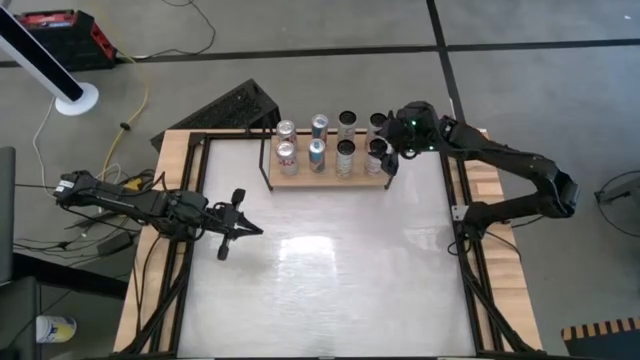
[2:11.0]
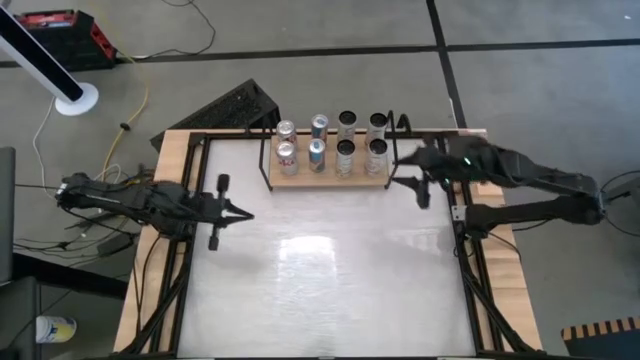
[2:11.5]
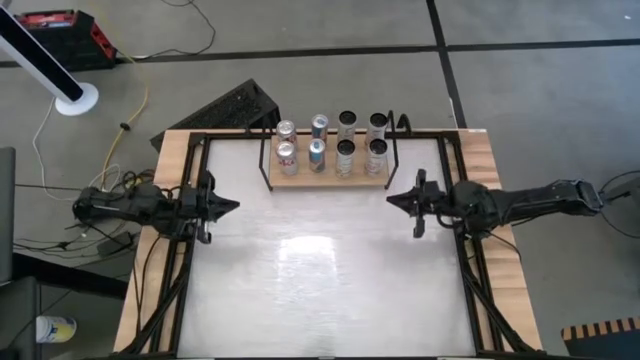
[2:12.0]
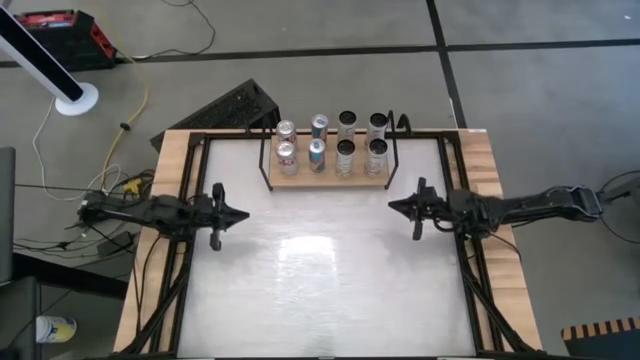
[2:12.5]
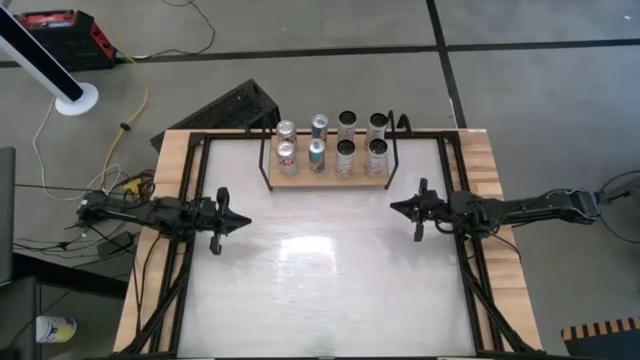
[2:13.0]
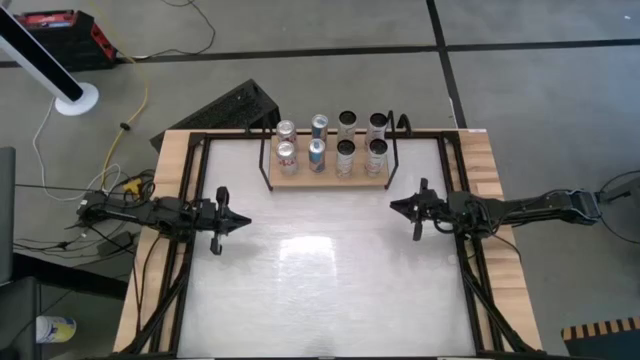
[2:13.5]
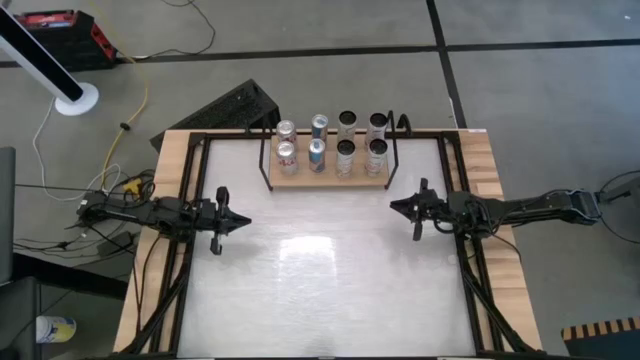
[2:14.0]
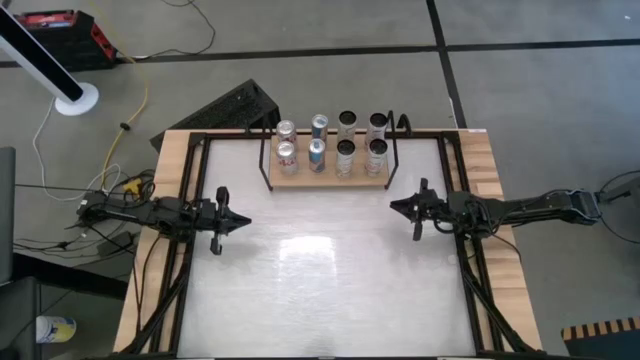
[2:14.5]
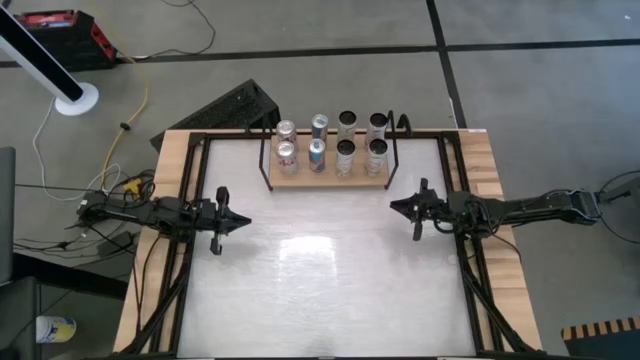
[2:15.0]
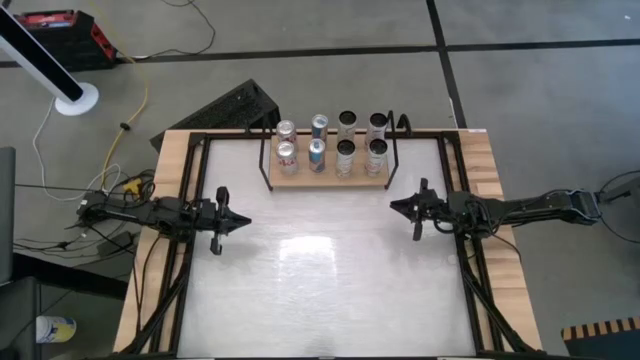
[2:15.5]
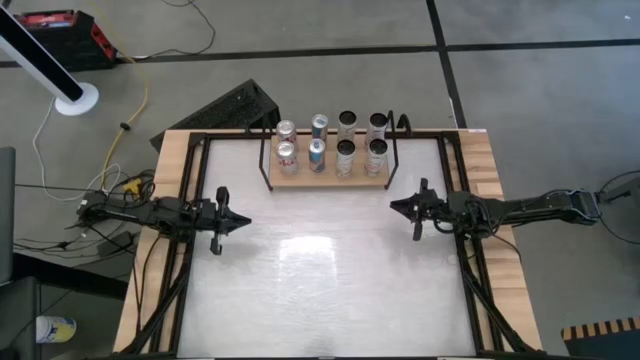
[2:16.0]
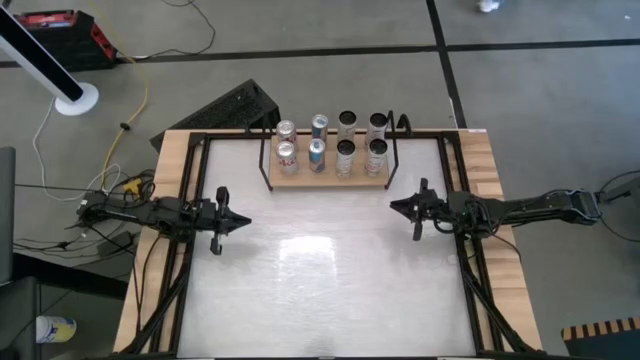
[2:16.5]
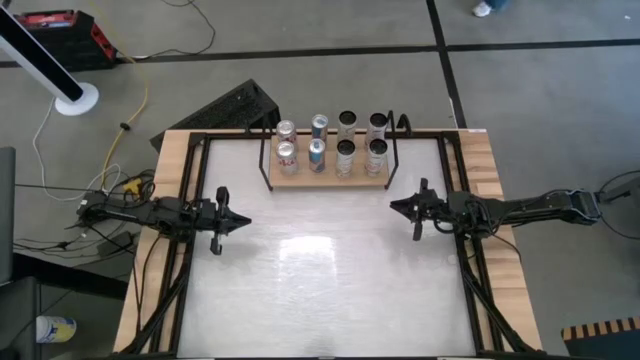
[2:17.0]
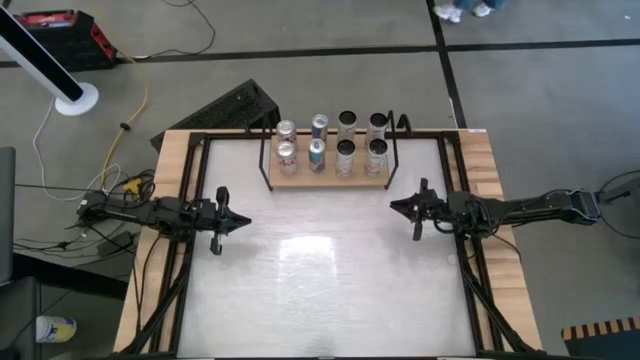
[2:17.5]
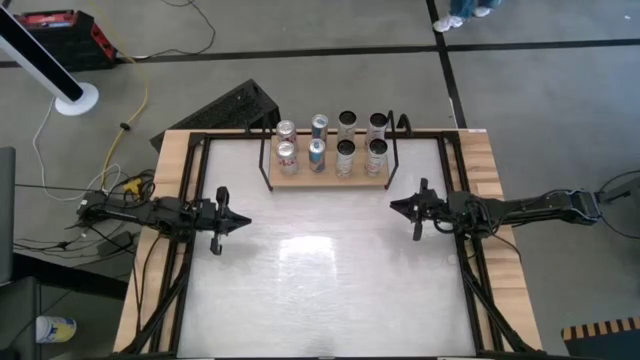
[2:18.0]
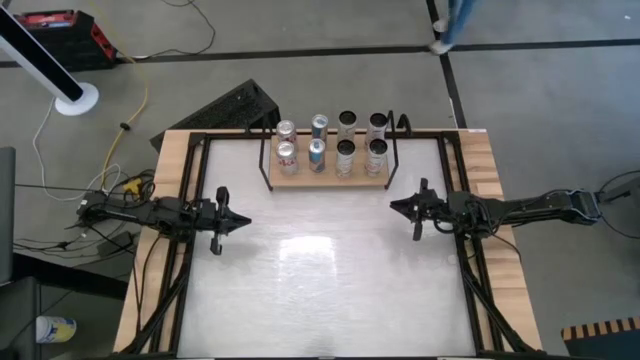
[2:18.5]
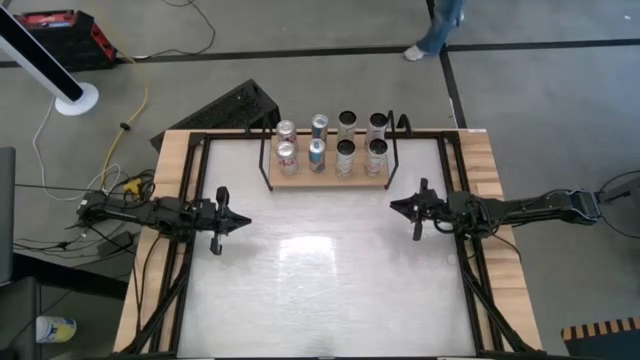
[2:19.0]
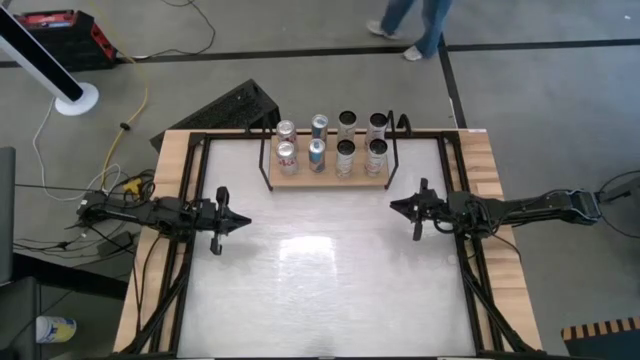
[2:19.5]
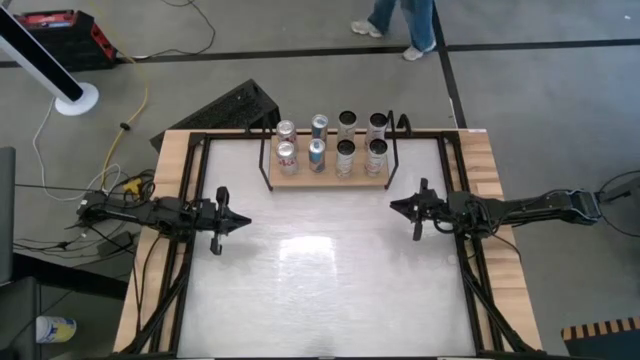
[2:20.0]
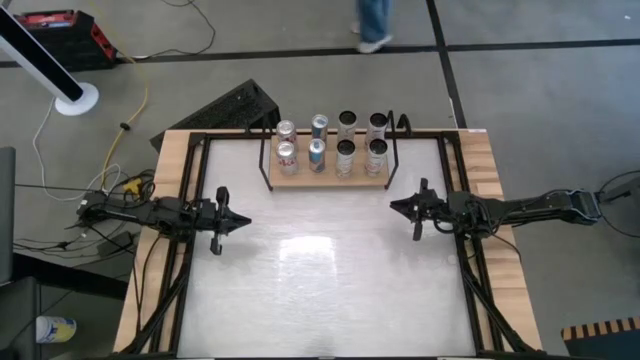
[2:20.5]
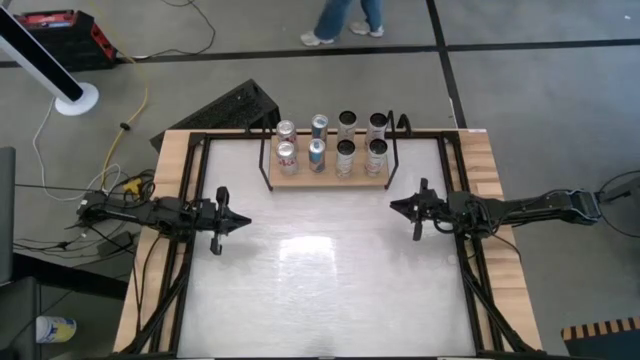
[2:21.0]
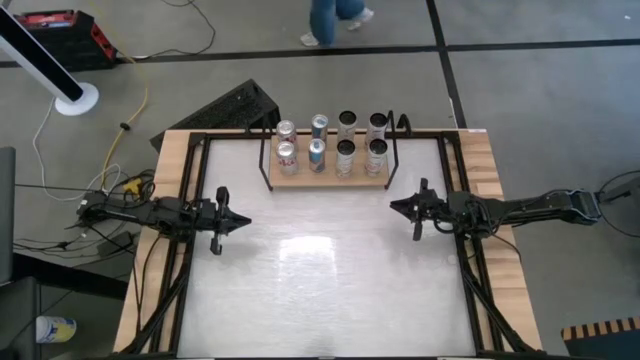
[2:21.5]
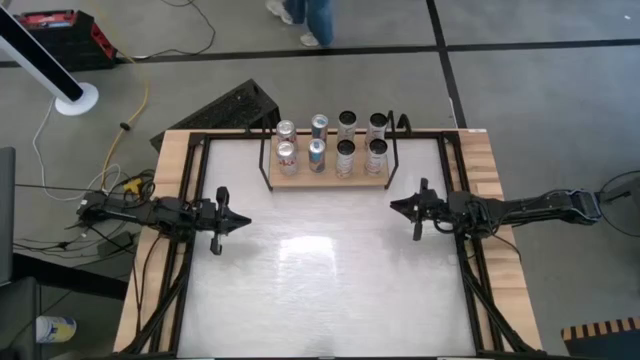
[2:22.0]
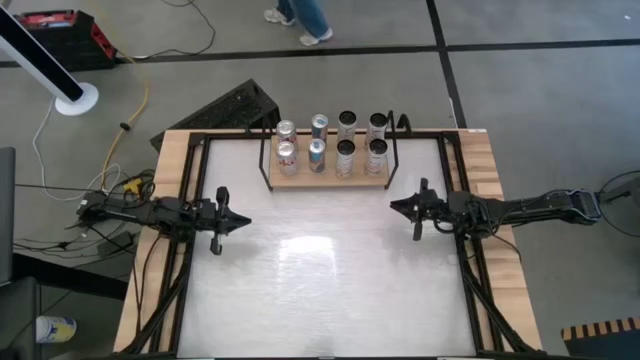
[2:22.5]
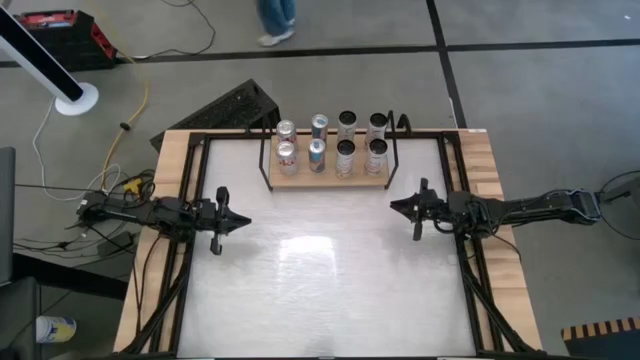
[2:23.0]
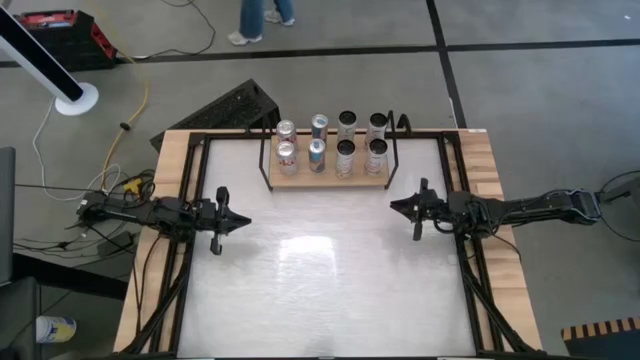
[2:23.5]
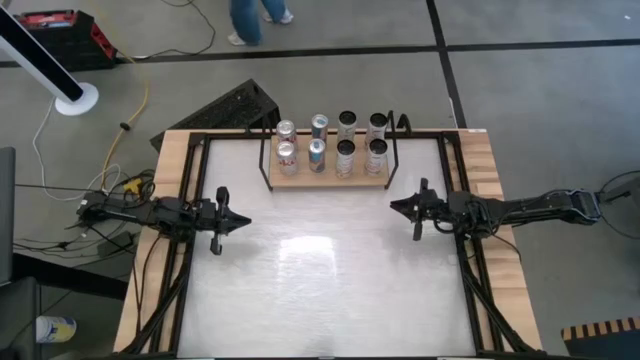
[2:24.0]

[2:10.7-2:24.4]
Task: Place canned beverage on shelf
Return to Home Position

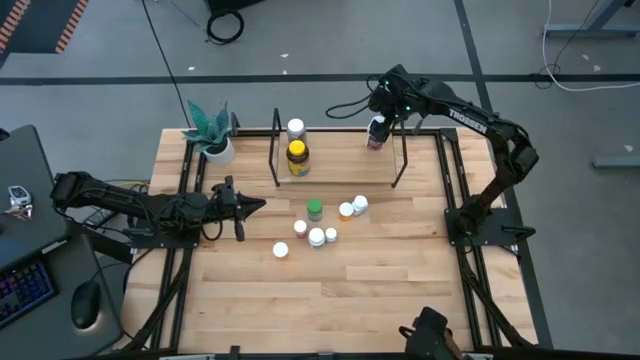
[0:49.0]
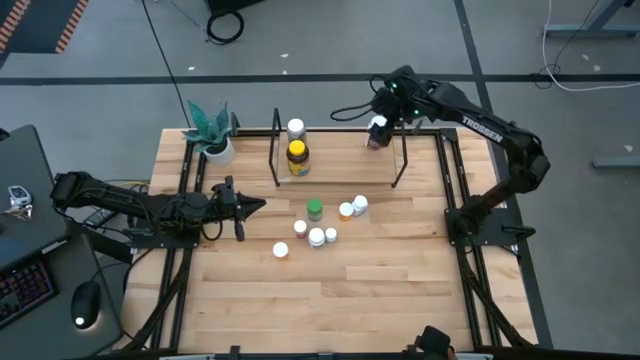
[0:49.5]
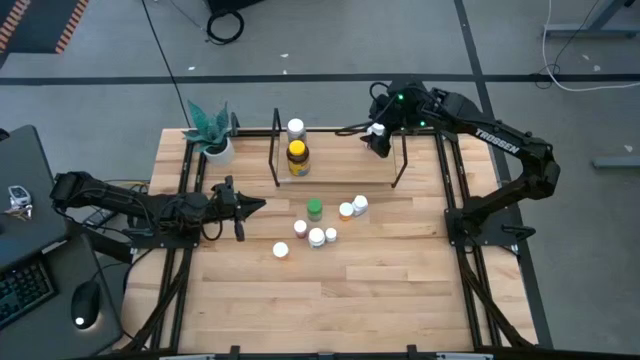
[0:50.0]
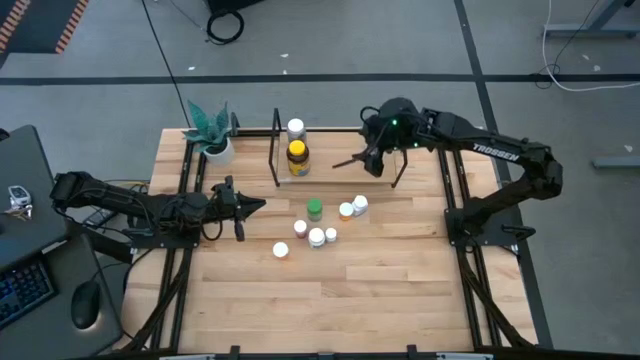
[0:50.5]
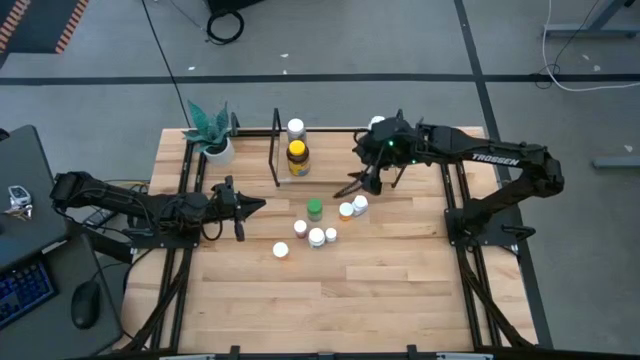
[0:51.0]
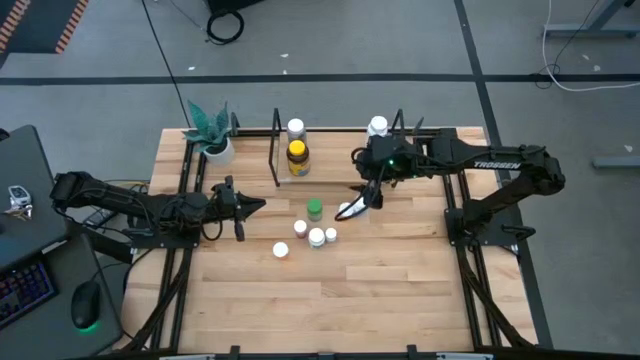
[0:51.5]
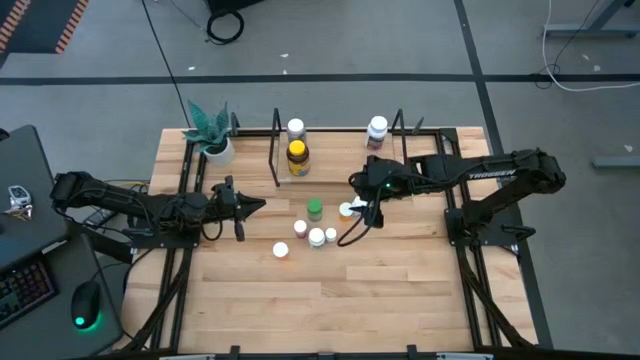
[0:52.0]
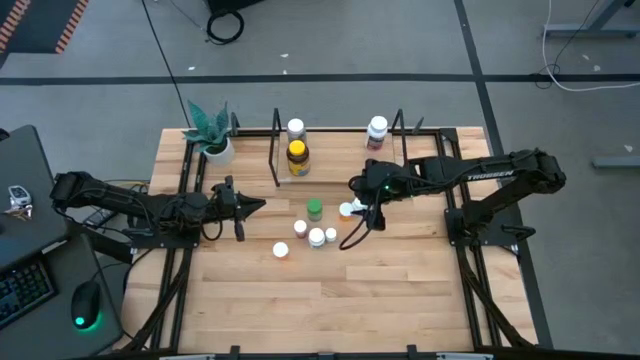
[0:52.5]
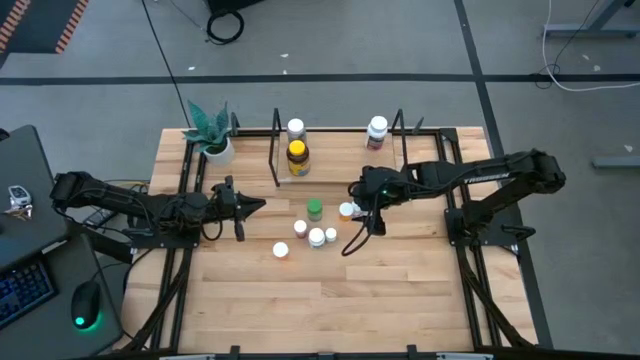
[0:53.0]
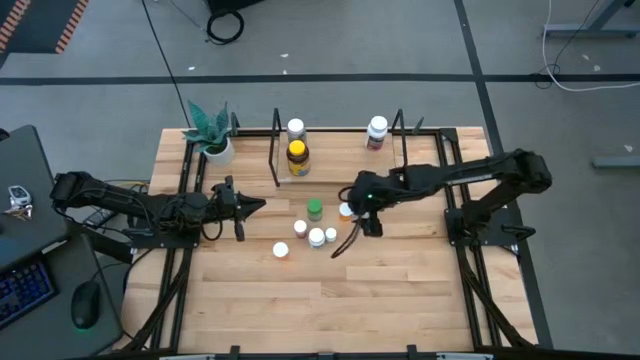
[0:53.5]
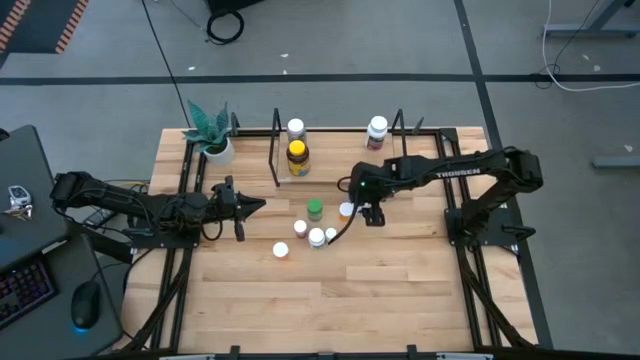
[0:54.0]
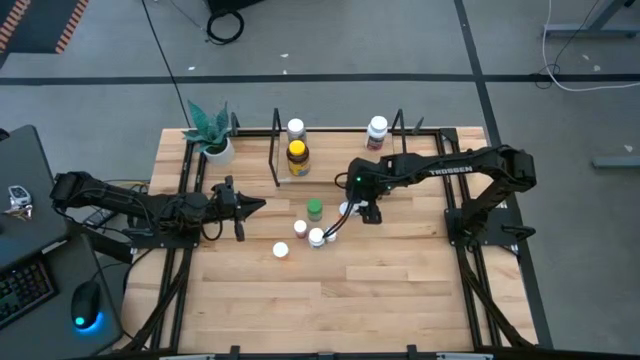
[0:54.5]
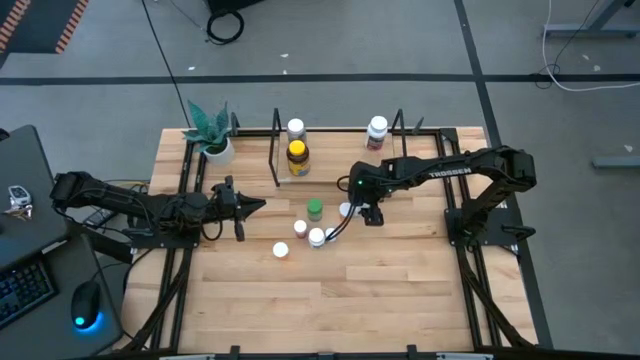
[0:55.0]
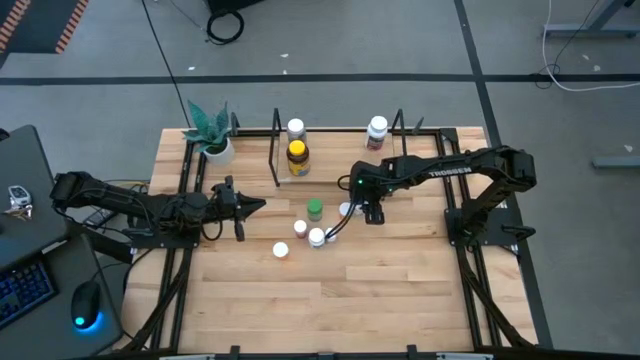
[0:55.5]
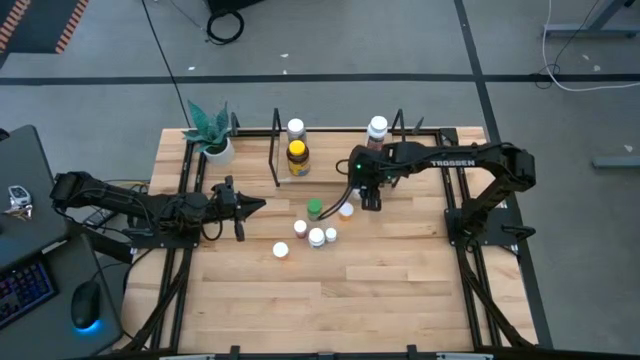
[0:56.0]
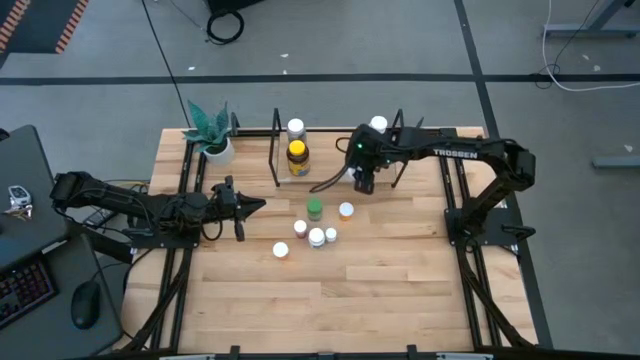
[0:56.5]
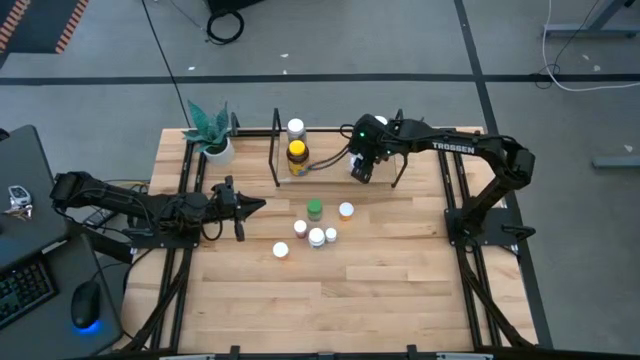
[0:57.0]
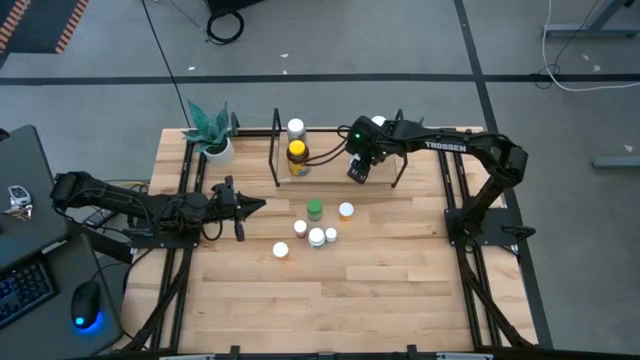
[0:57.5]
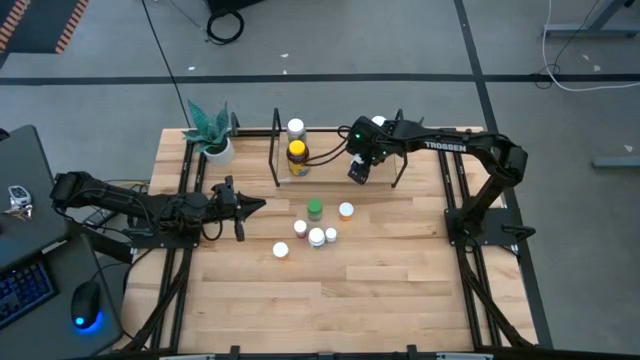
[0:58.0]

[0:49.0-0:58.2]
Task: Pick and place medicine bottles onto shelf by color
Put the white and blue medicine bottle on the shelf
